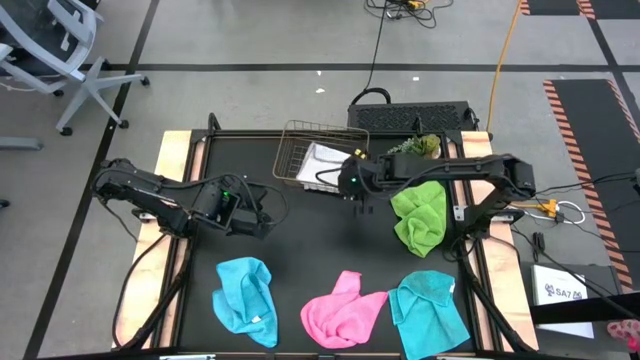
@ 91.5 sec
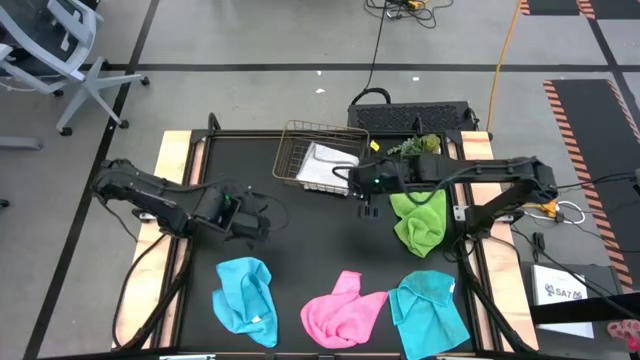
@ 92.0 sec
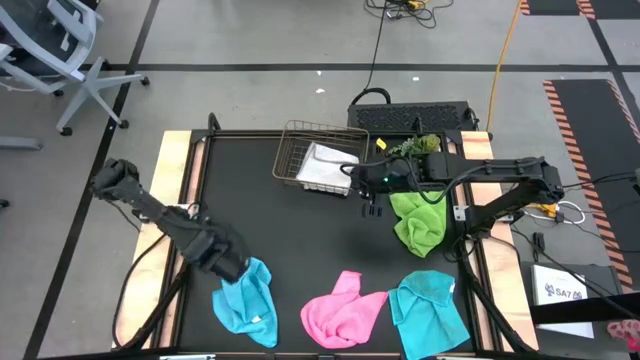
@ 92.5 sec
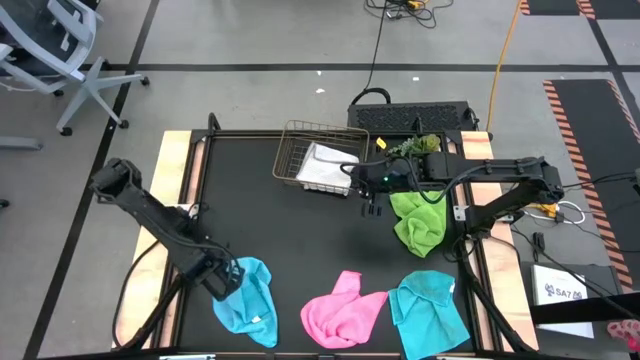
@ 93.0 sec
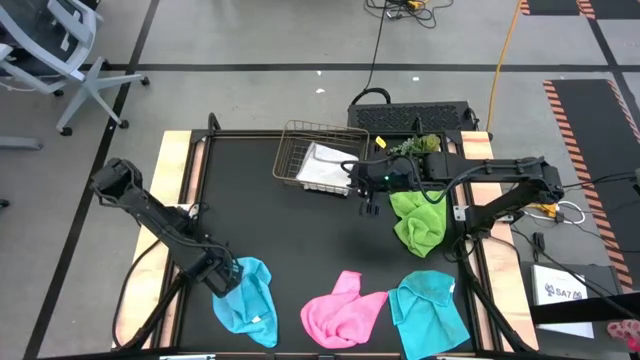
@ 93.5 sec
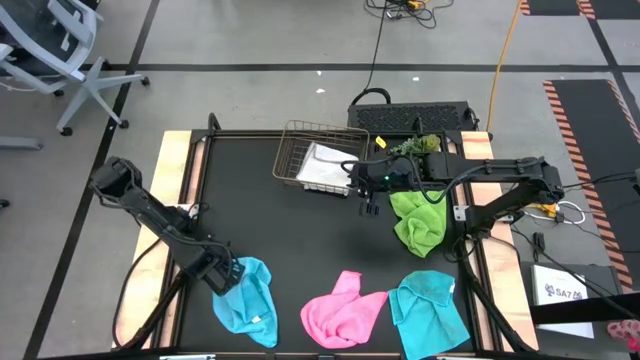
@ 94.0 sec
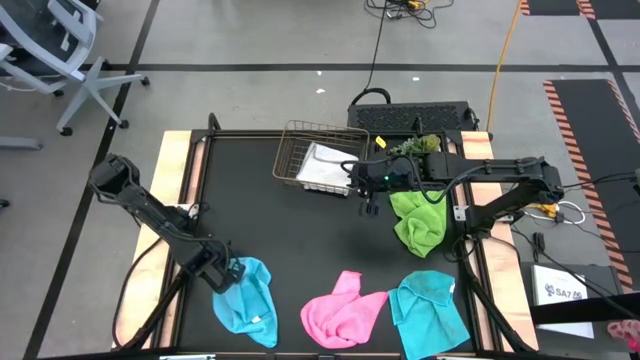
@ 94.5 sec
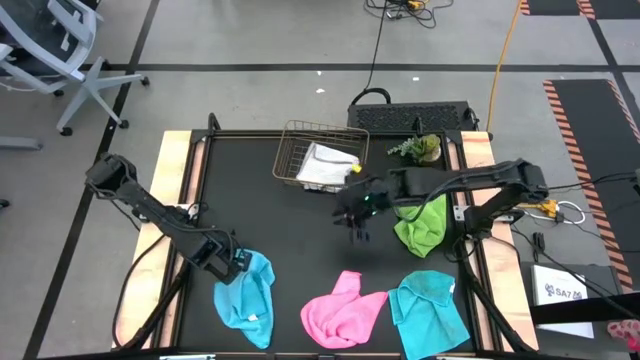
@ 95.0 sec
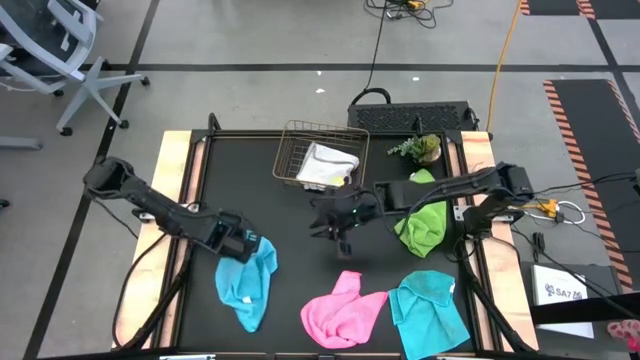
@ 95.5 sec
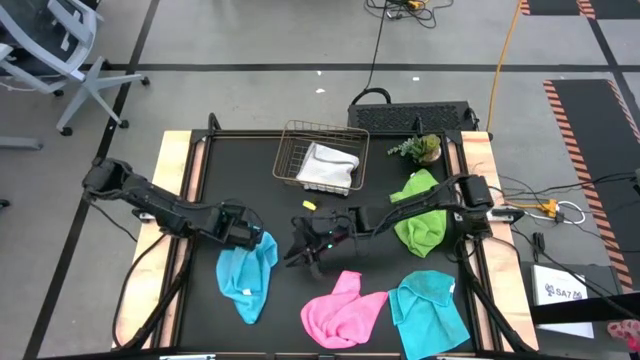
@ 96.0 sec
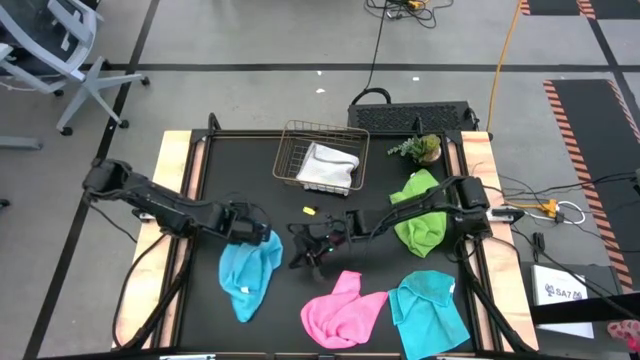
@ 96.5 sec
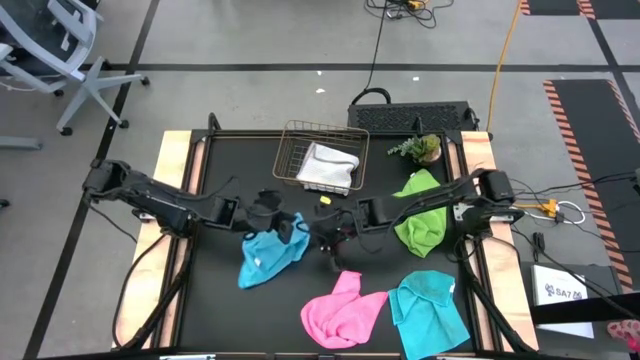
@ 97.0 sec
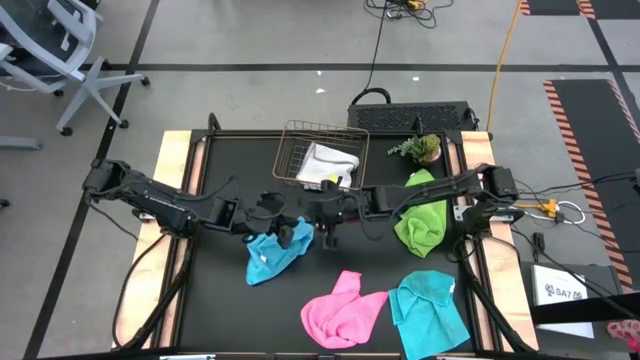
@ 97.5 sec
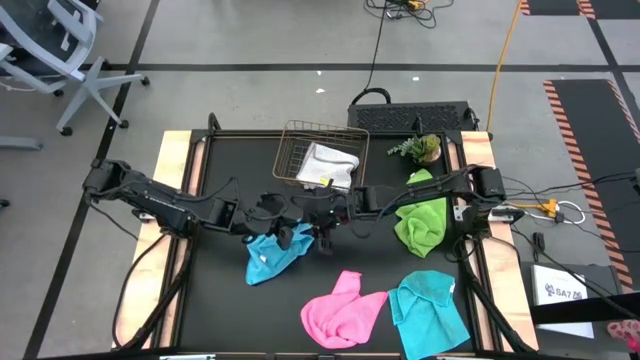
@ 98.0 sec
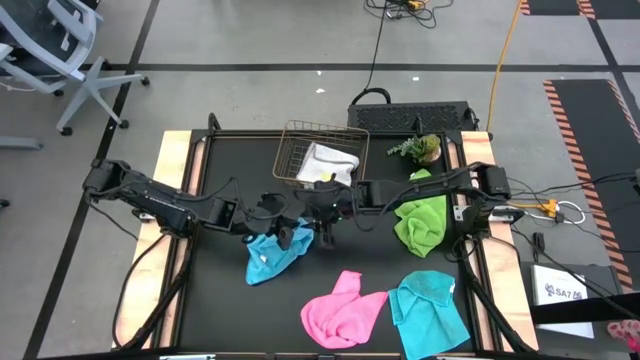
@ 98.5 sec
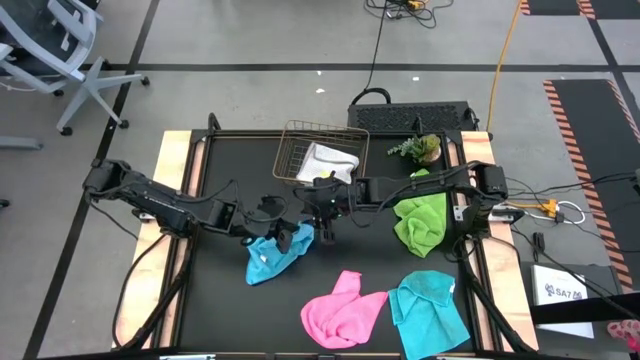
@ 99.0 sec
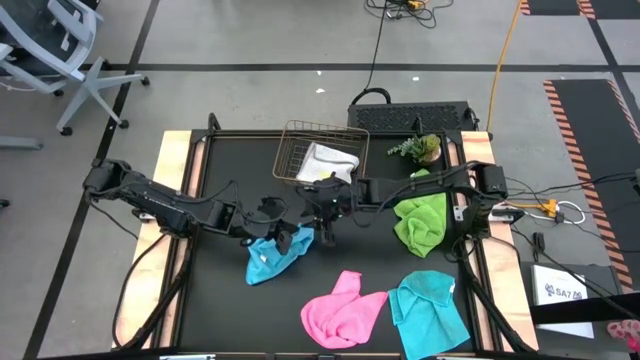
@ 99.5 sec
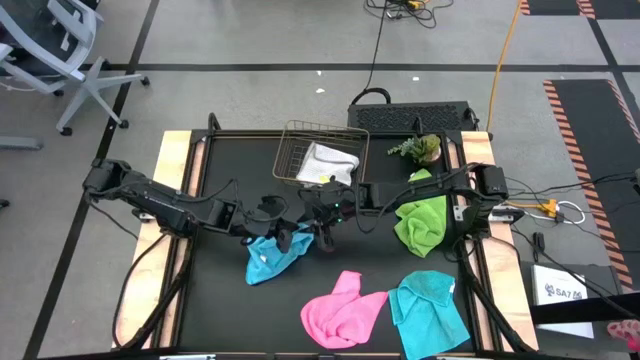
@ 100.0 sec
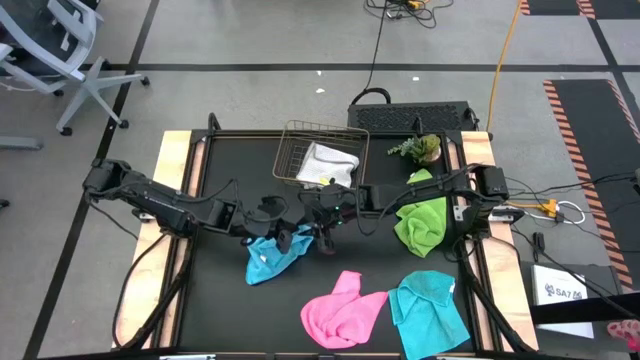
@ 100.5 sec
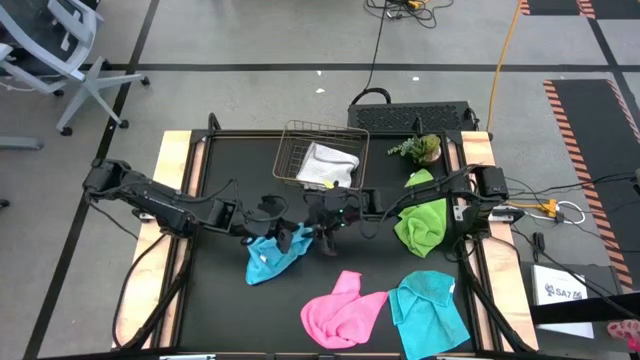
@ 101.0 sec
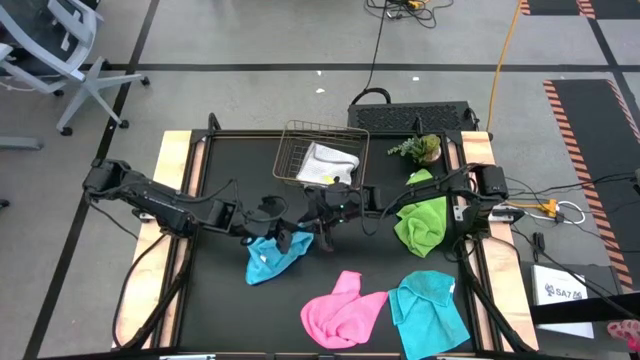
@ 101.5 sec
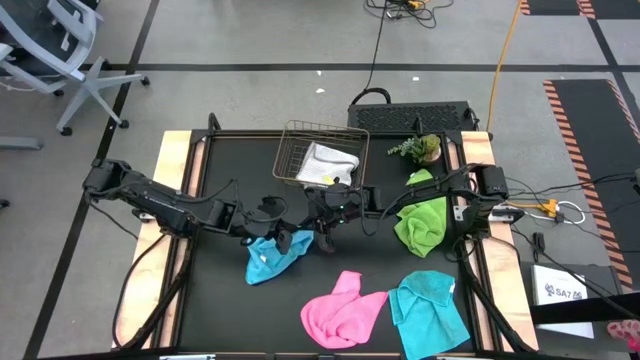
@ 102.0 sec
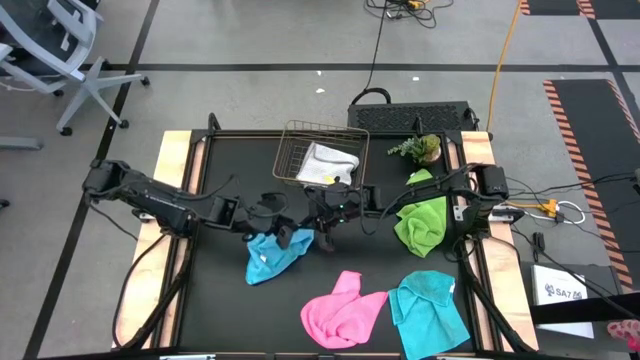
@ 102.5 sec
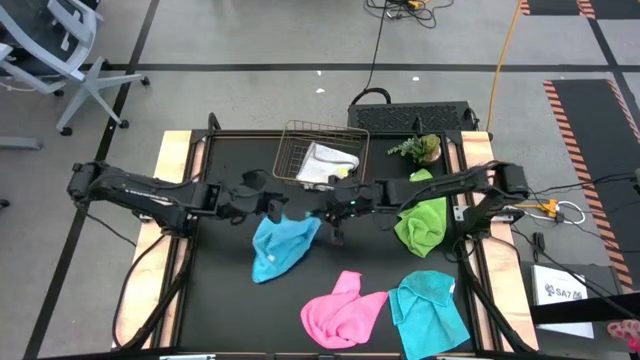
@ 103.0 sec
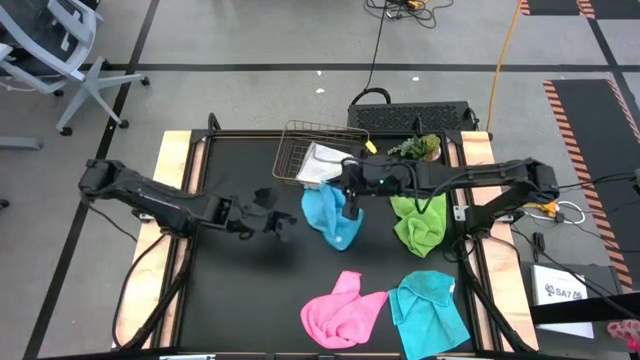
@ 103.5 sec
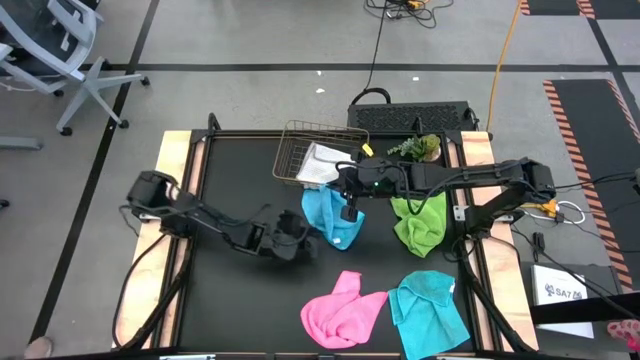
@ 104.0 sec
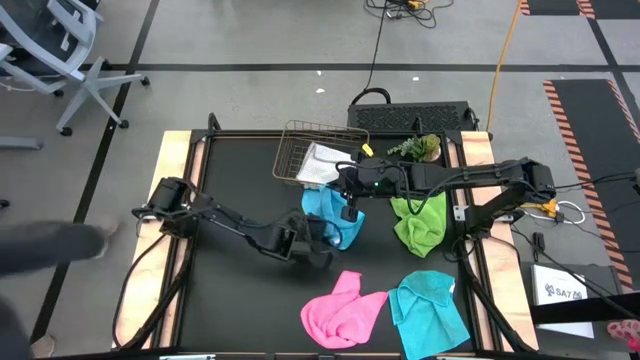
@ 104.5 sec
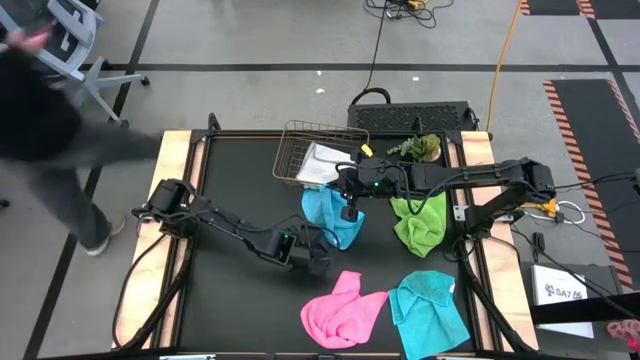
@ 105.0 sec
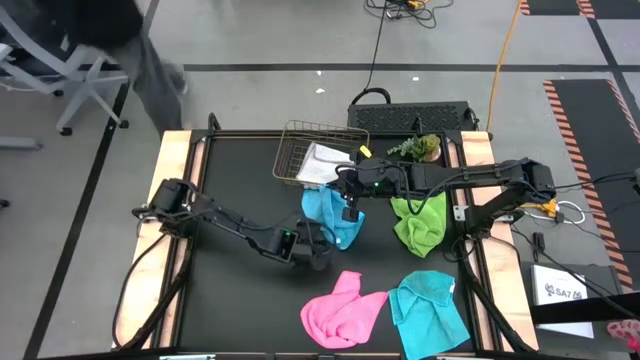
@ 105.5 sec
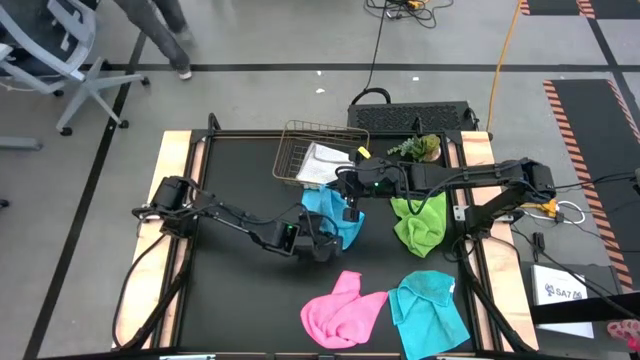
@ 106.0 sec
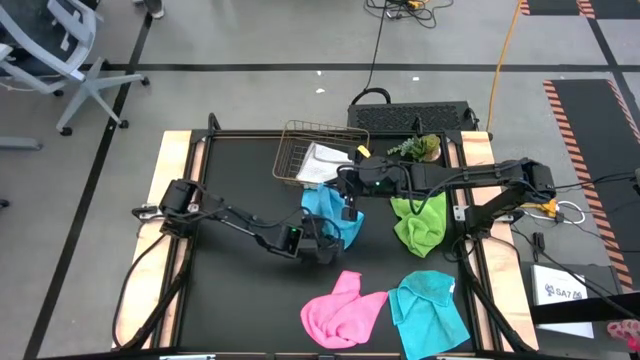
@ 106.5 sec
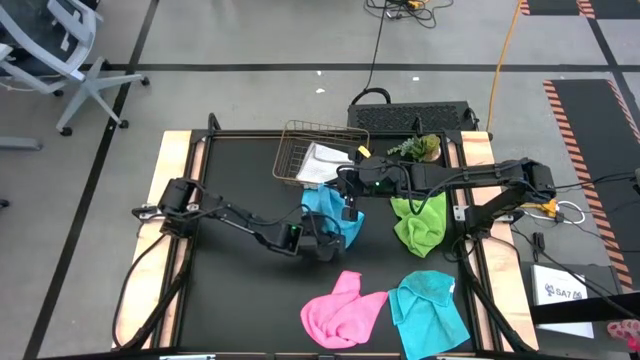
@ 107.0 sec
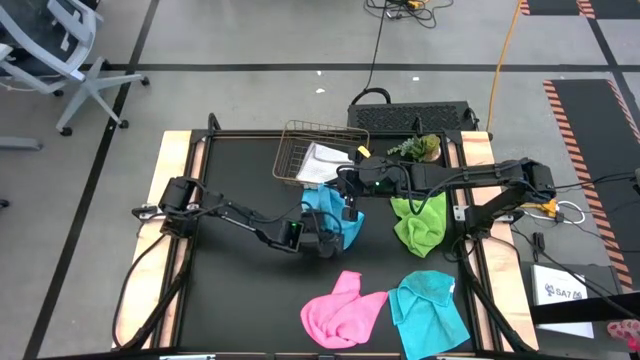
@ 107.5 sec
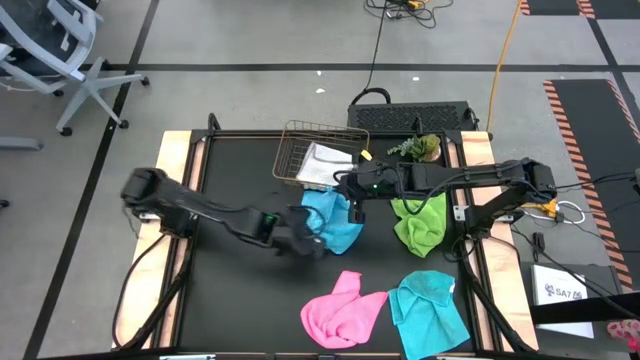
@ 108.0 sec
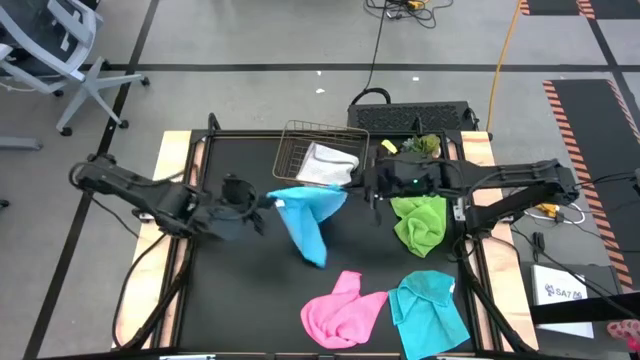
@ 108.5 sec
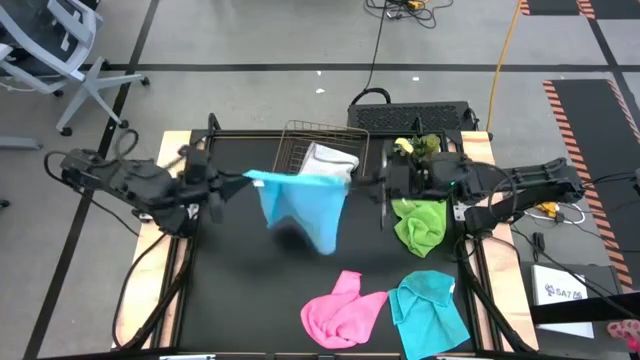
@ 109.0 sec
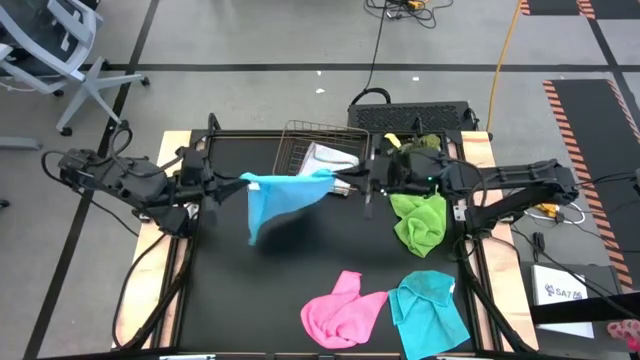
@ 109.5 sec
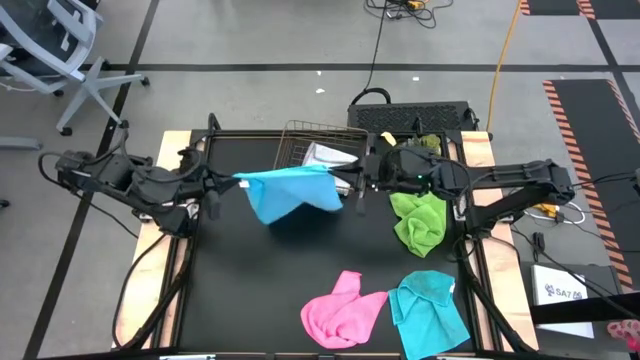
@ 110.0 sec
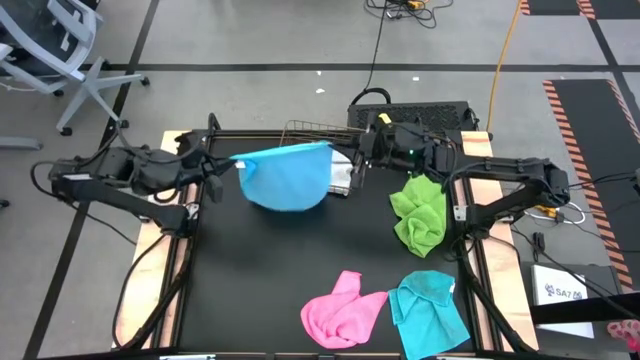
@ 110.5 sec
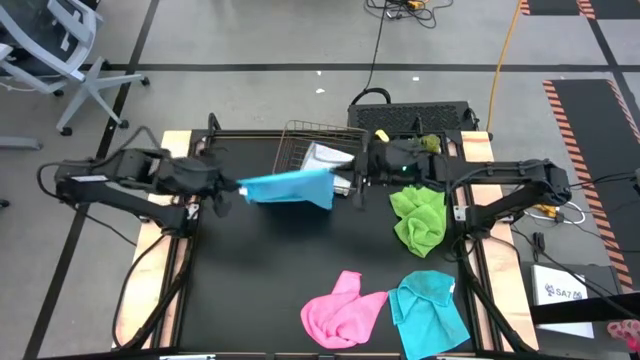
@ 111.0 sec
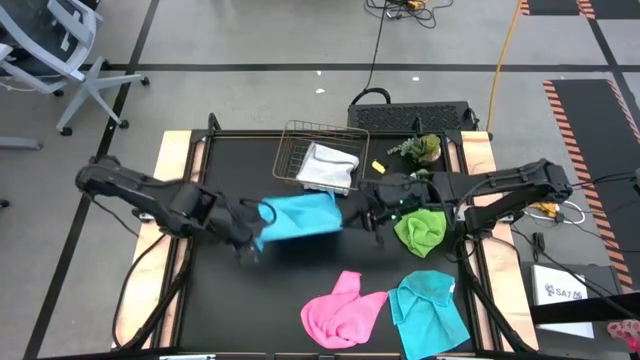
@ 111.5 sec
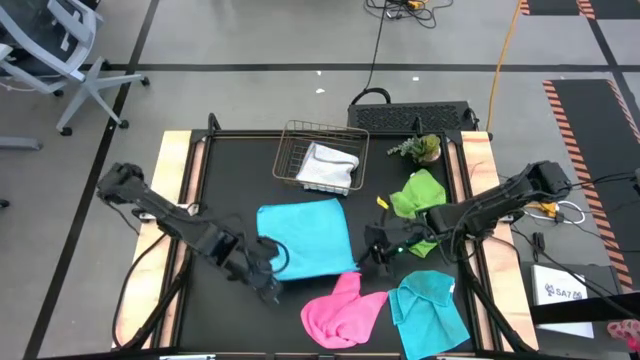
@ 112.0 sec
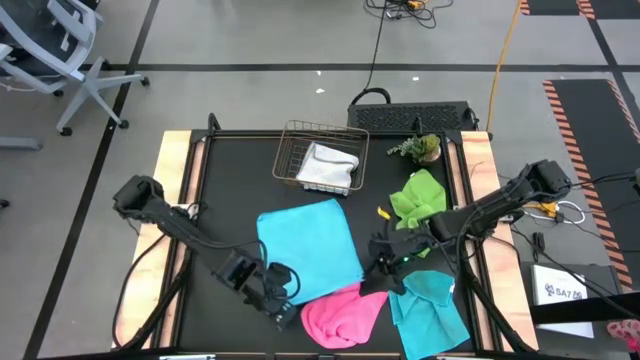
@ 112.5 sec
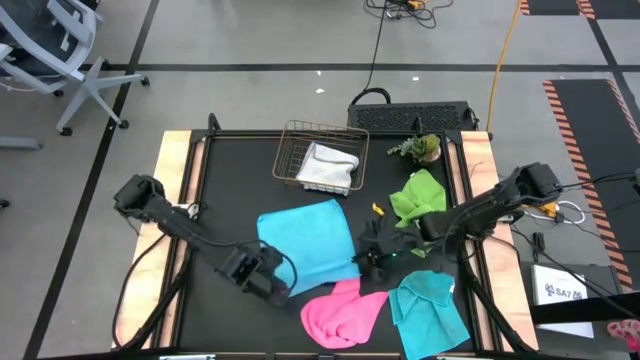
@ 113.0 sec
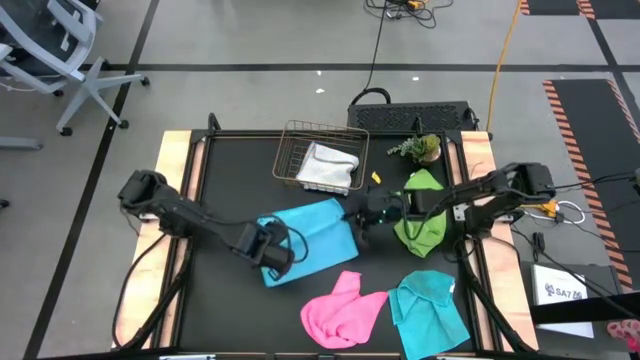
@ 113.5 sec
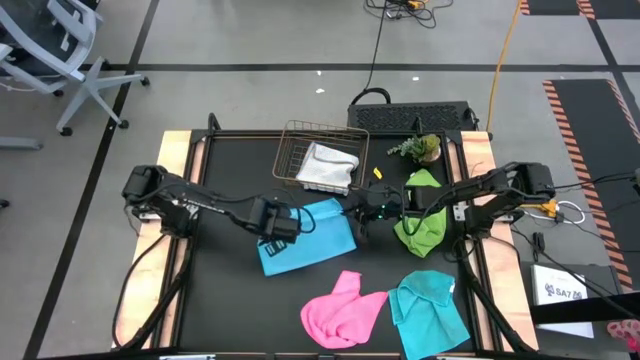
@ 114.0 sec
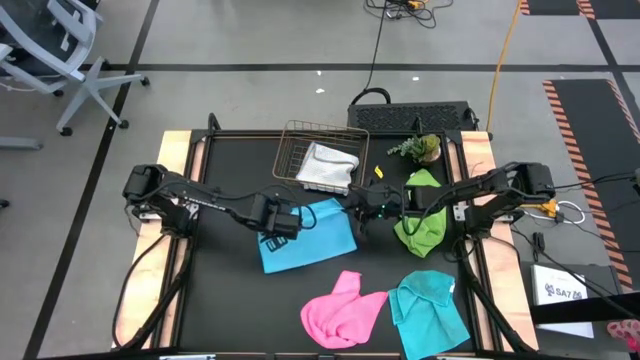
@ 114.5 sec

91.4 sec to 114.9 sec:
Task: Fold microfiber towels
Fold the left blue microfiber cloth
